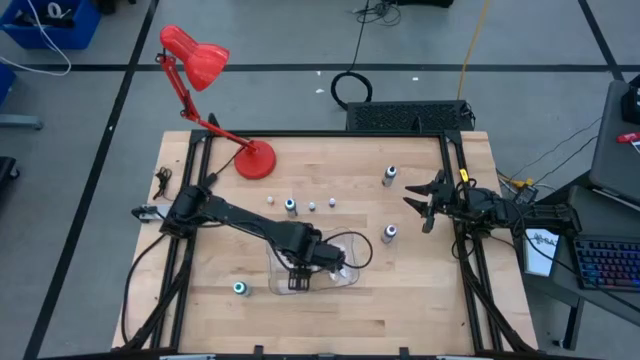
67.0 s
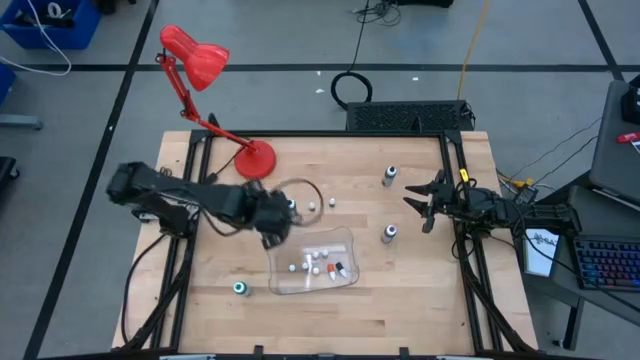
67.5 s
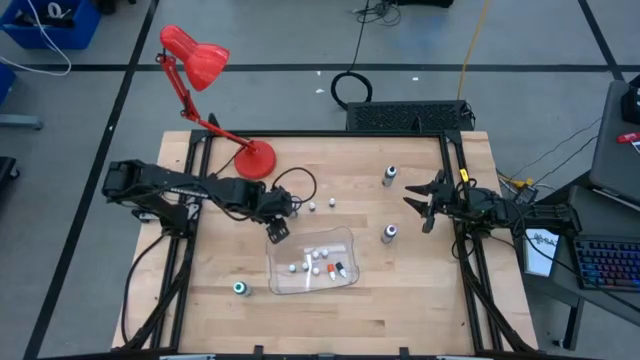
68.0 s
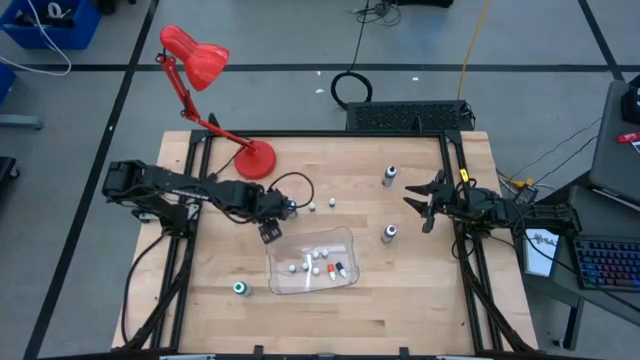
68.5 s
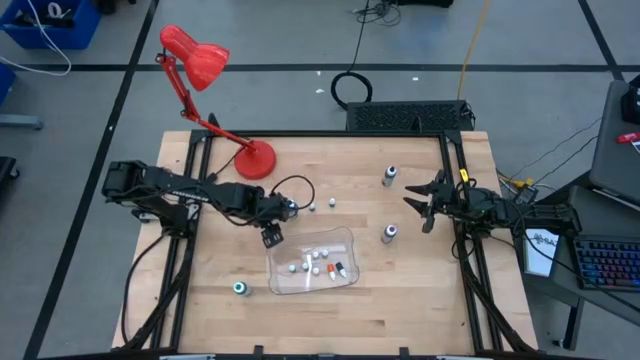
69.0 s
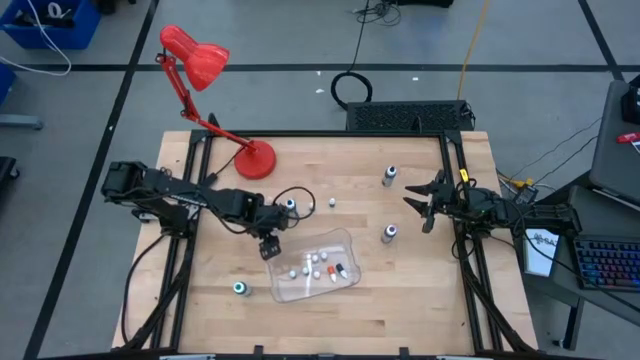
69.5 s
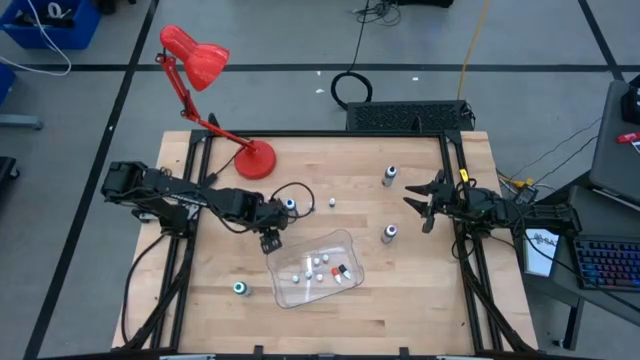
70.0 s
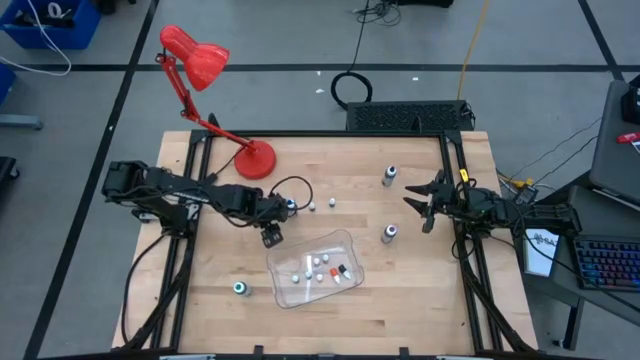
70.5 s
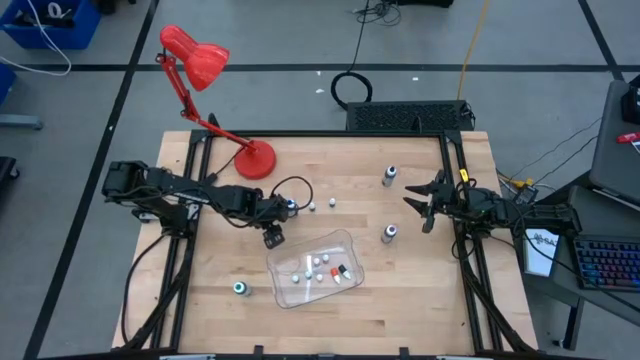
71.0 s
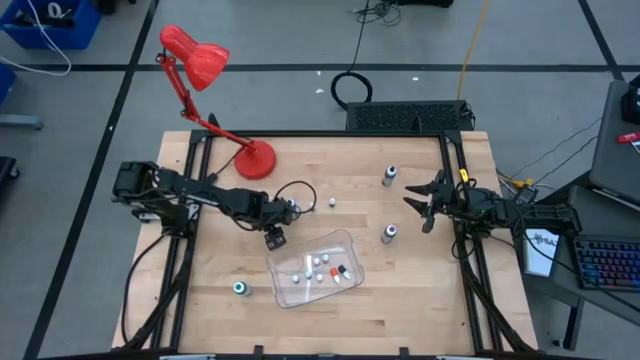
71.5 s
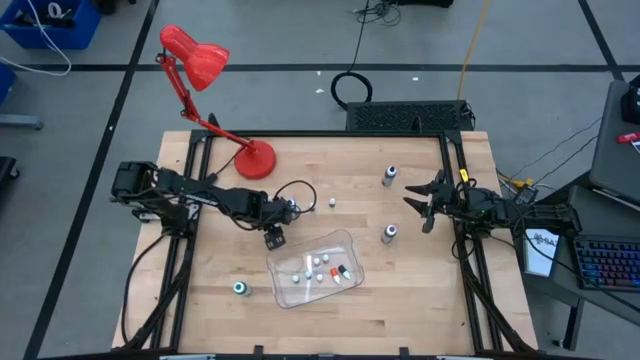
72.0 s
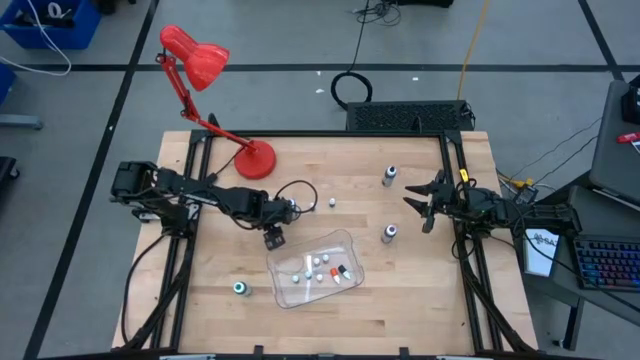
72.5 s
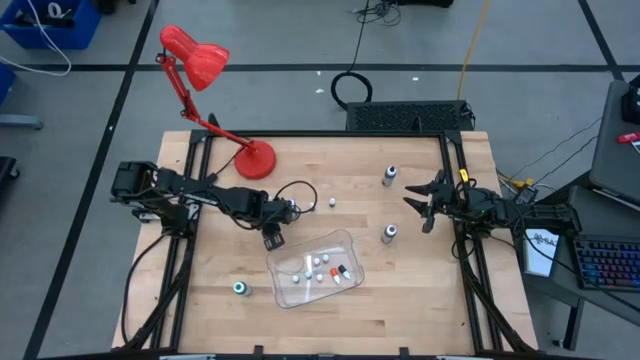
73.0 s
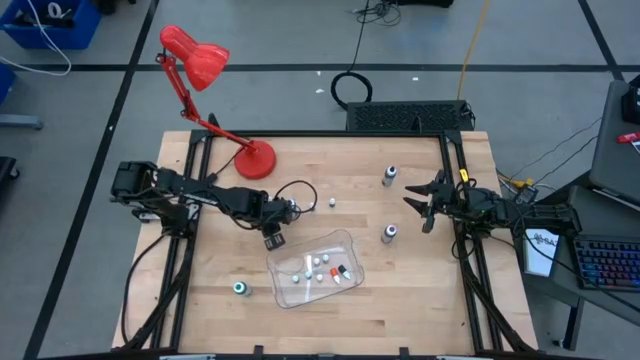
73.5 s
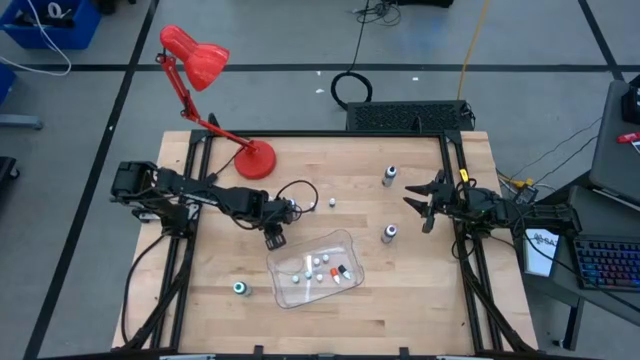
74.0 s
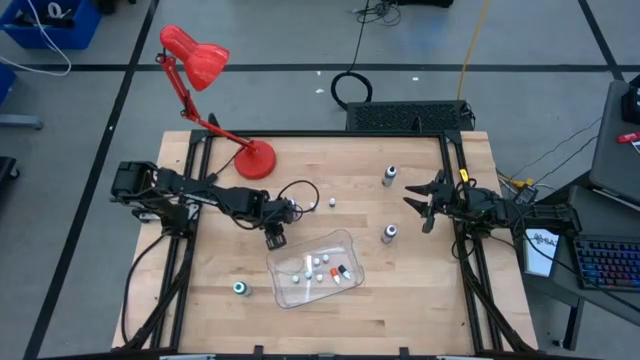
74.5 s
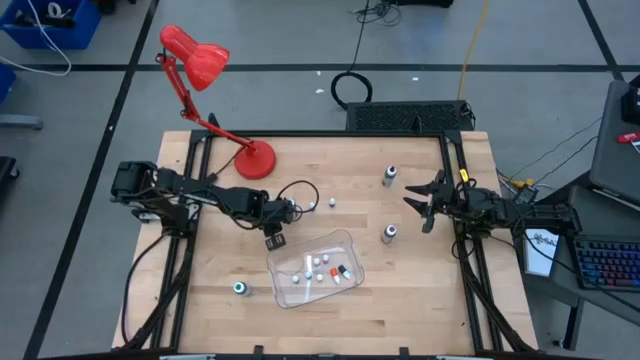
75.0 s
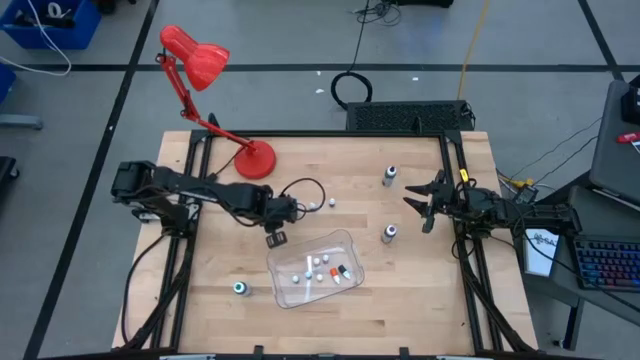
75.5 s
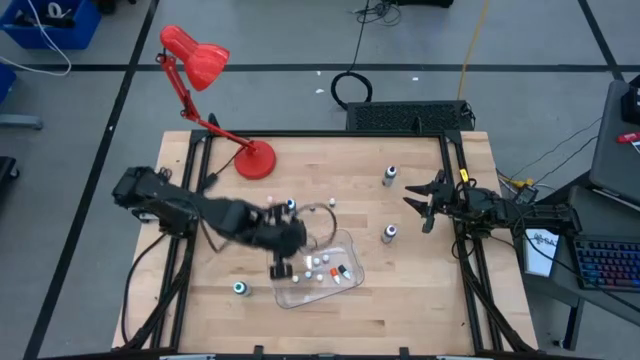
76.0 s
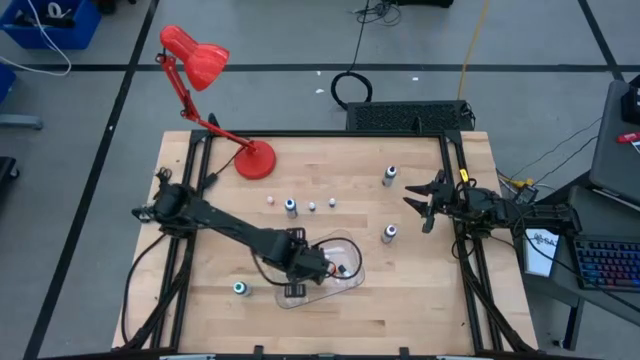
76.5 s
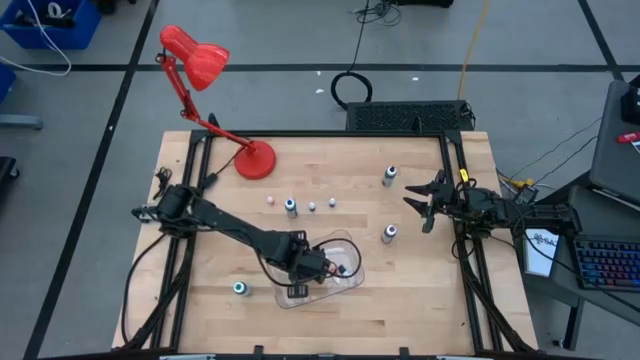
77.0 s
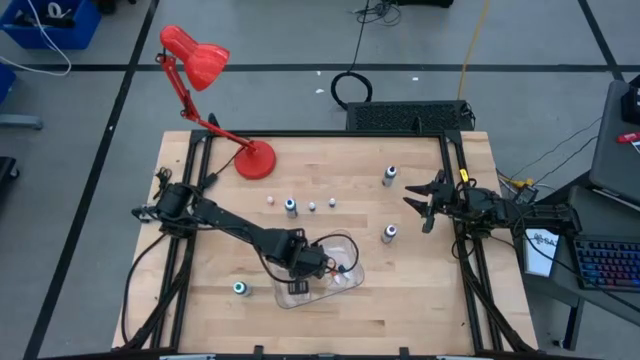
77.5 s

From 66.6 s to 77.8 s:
Task: Pick & Place food coloring
Put the left small black food coloring into the bin

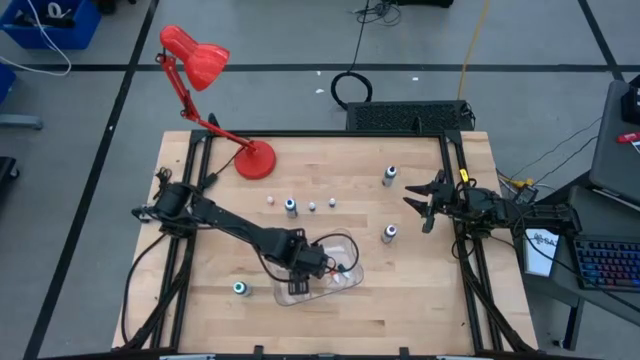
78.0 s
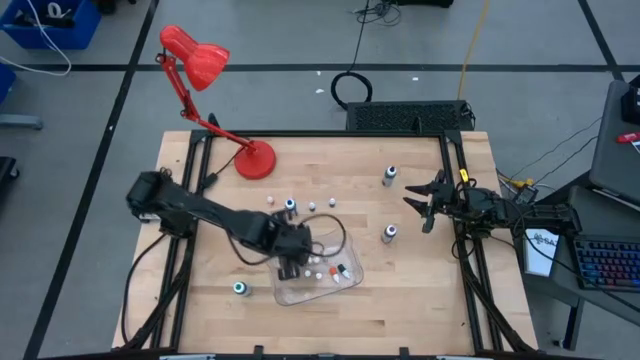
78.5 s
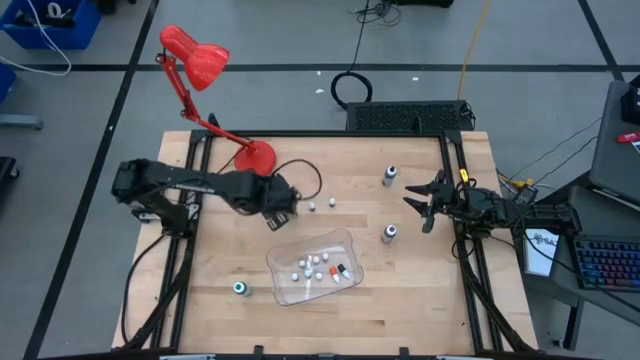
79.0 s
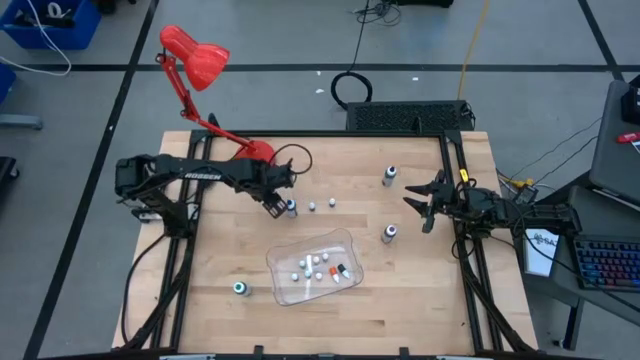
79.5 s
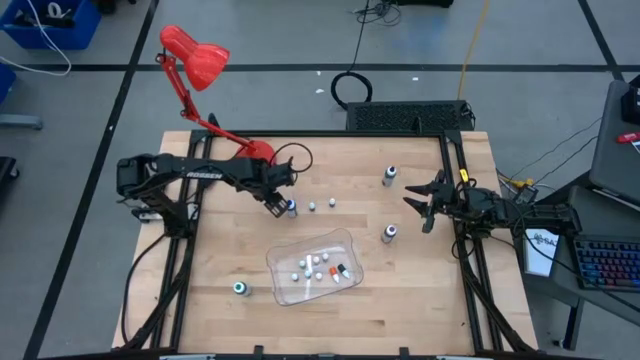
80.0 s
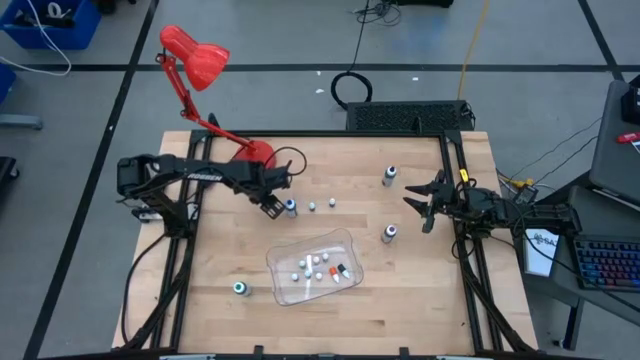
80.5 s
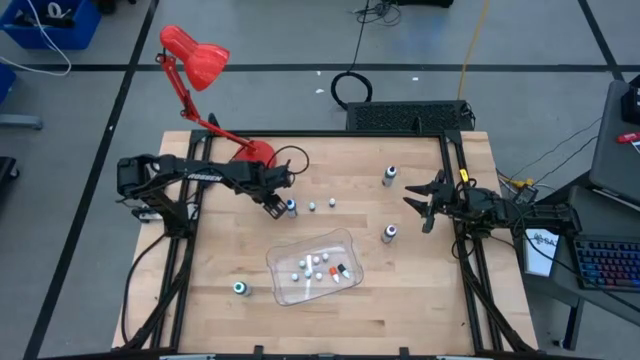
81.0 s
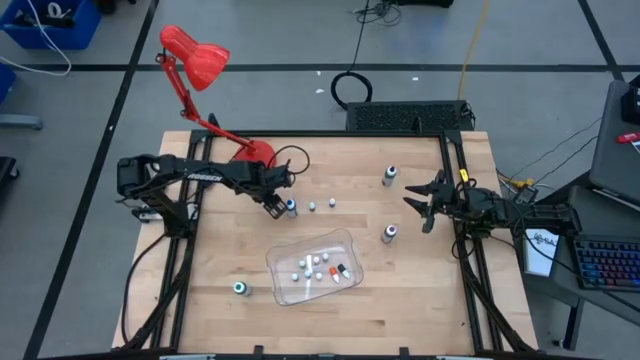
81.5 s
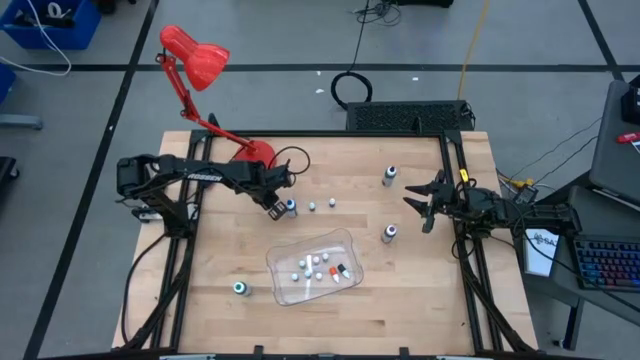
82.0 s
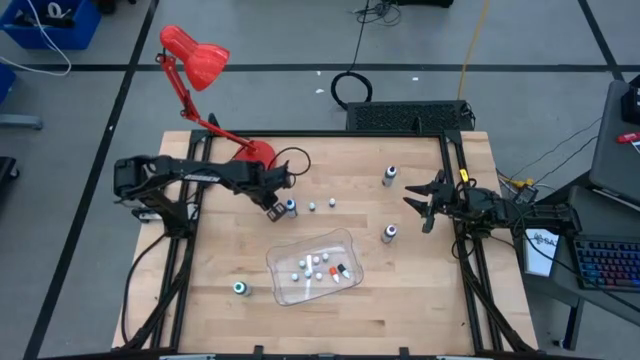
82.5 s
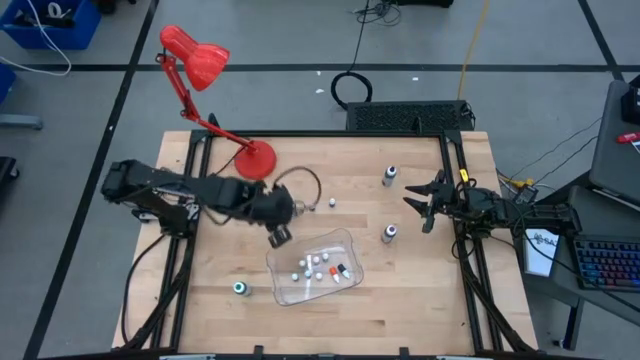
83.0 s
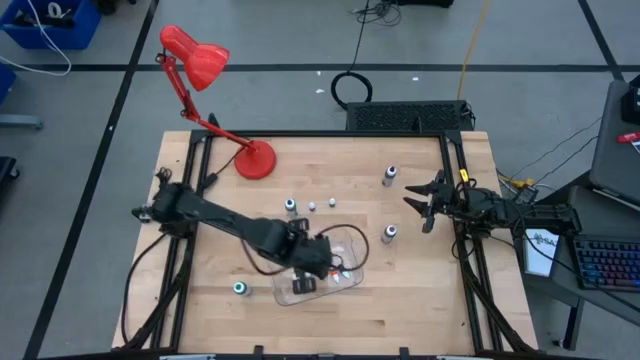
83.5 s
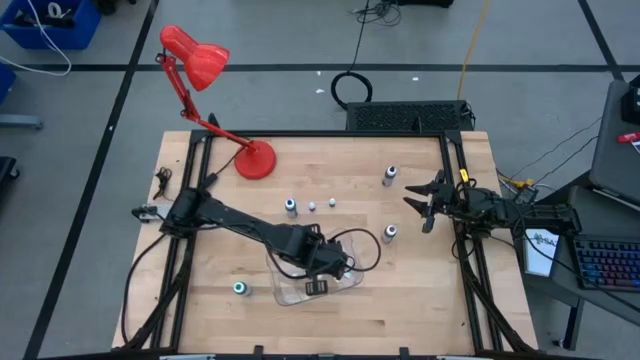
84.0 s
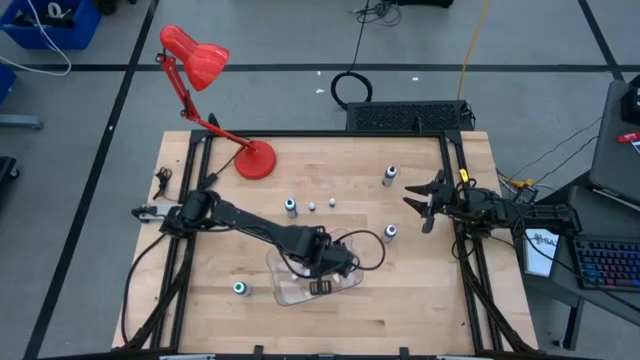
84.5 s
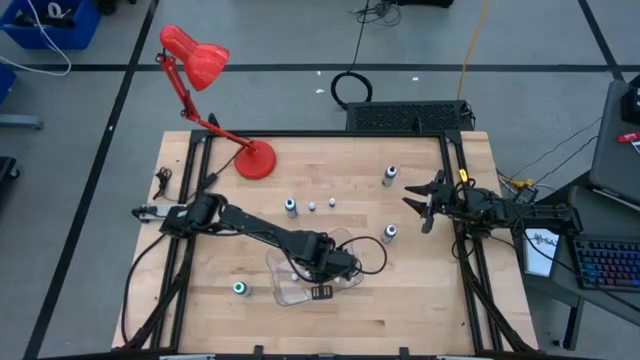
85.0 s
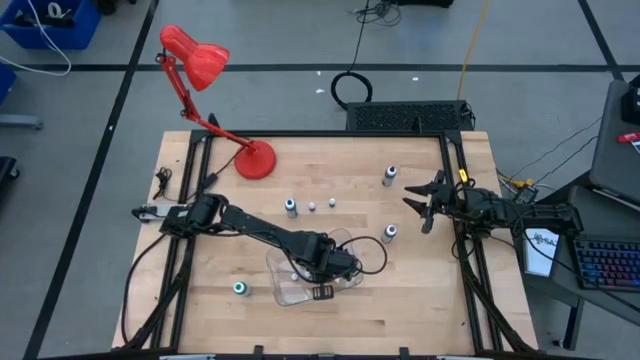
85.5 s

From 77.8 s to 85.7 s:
Put the small orange food coloring into the bin

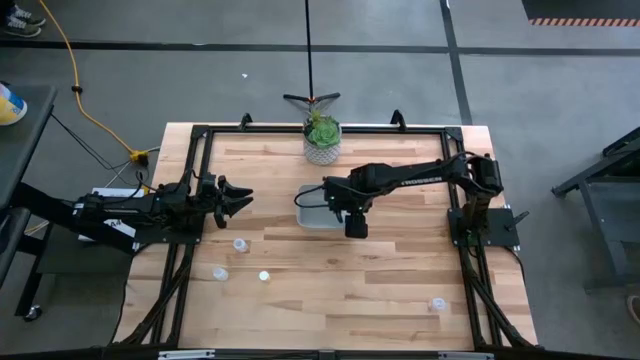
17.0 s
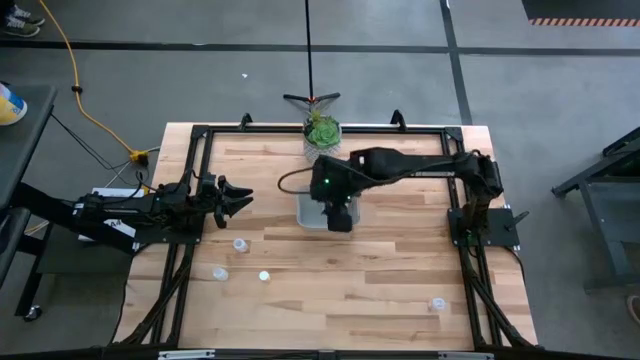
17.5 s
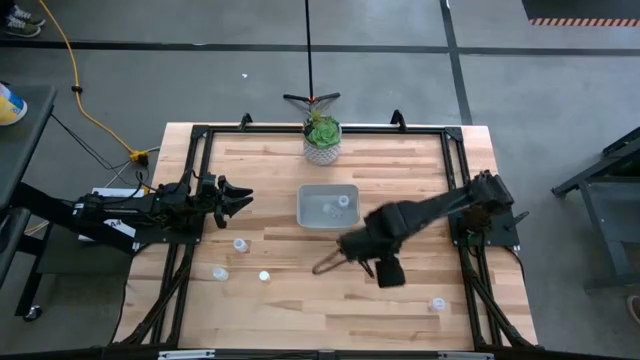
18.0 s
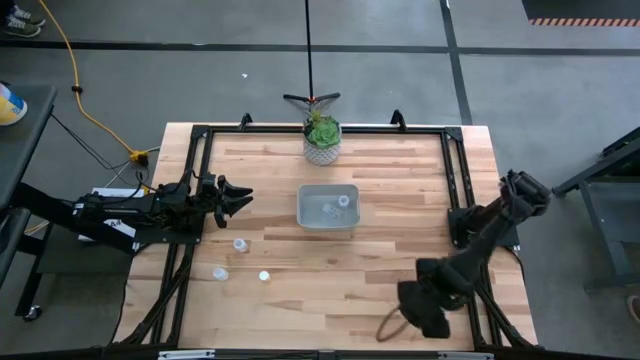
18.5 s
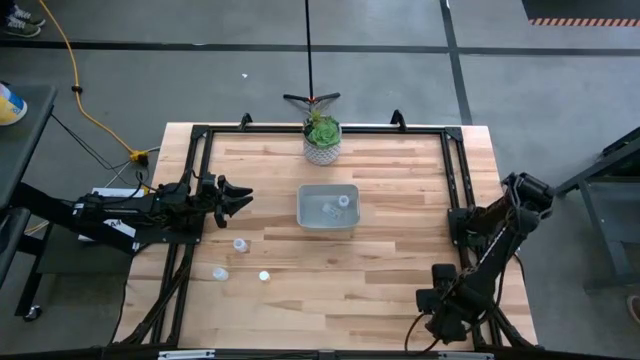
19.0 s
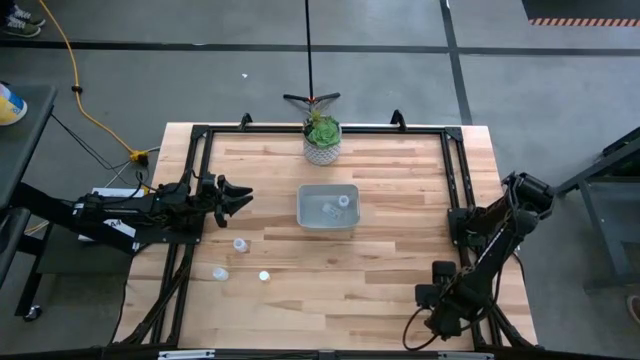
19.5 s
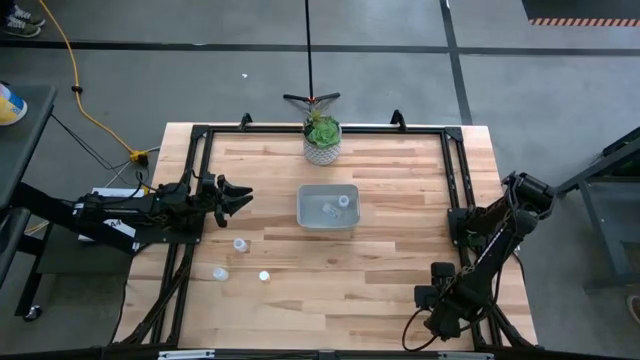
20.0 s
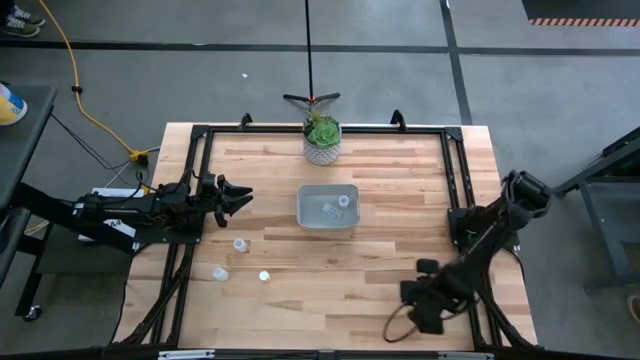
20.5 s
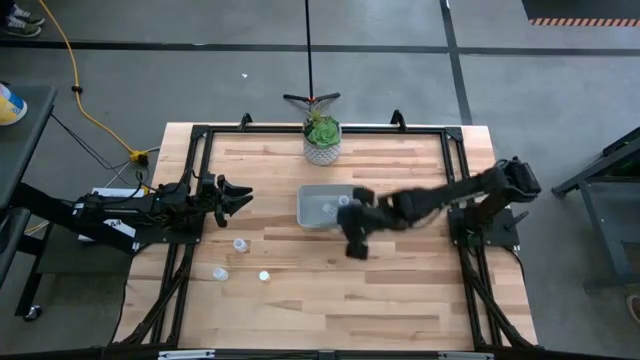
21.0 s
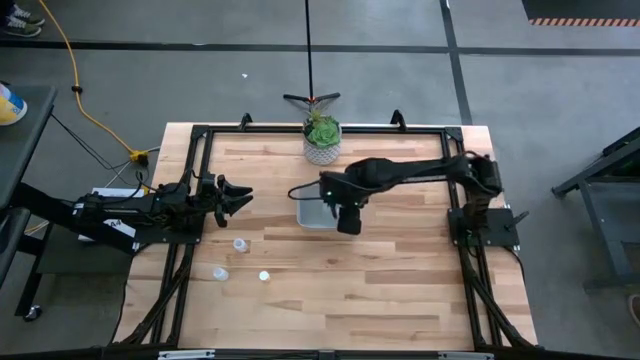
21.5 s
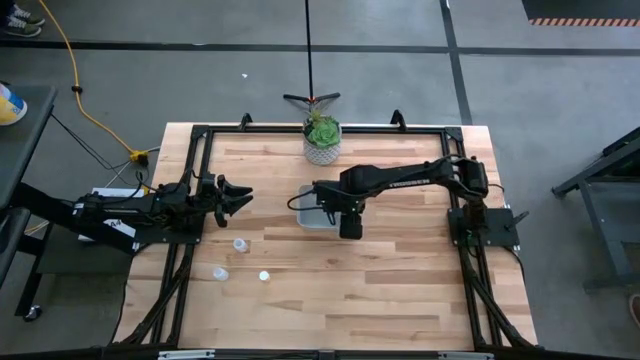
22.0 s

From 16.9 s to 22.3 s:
Task: Pick and place pill bottles into a basket
Put the bottom transparent pill bottle into the gray bin
